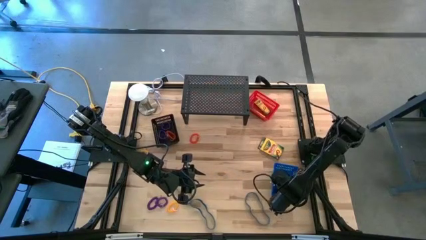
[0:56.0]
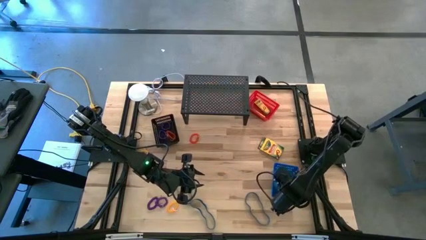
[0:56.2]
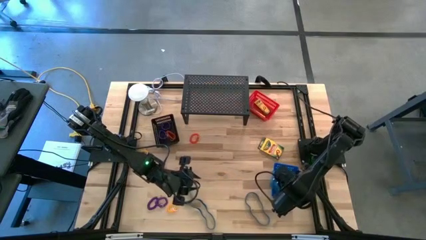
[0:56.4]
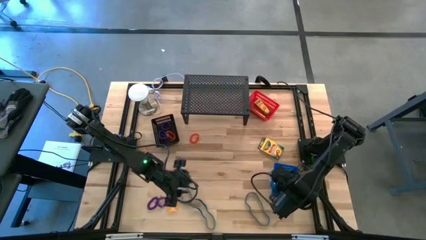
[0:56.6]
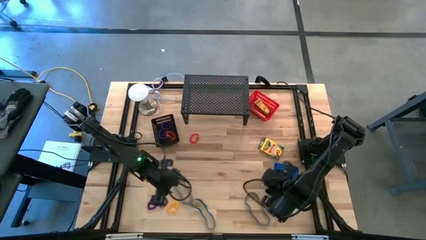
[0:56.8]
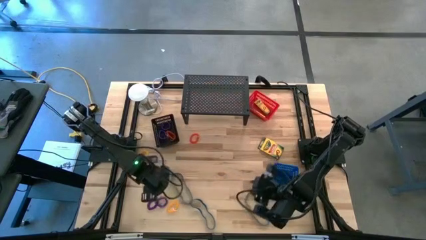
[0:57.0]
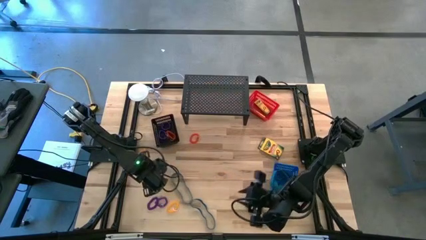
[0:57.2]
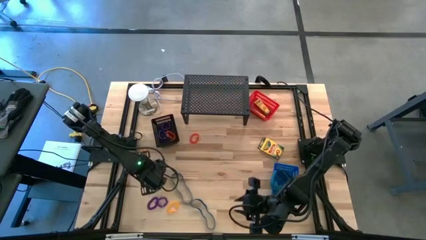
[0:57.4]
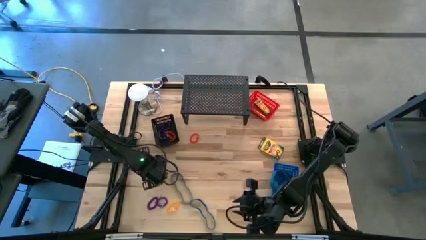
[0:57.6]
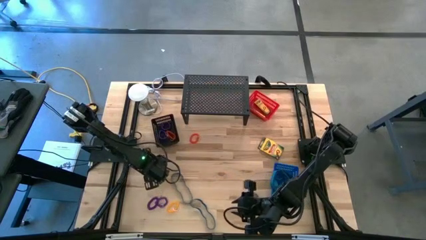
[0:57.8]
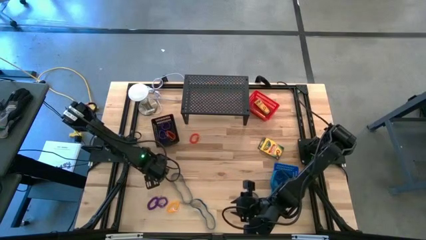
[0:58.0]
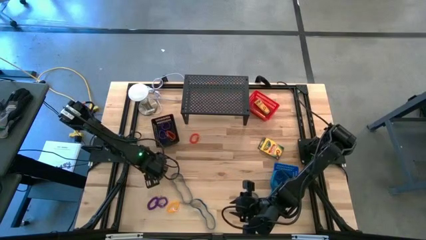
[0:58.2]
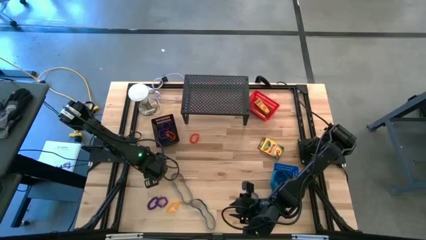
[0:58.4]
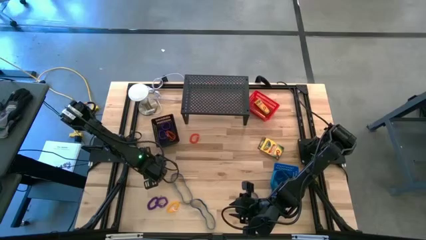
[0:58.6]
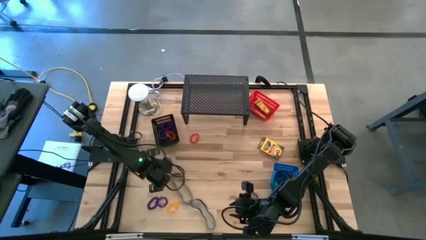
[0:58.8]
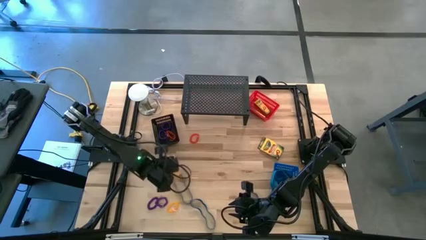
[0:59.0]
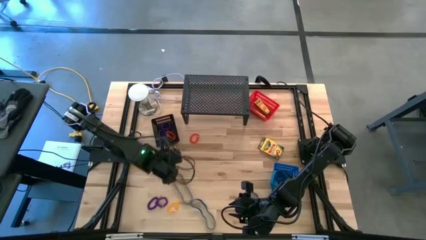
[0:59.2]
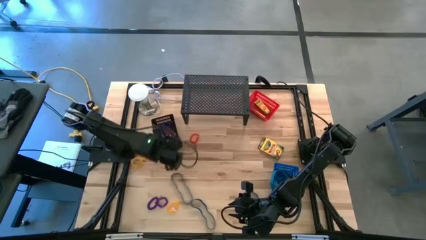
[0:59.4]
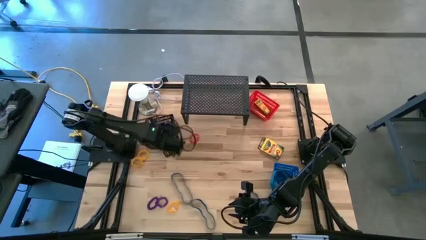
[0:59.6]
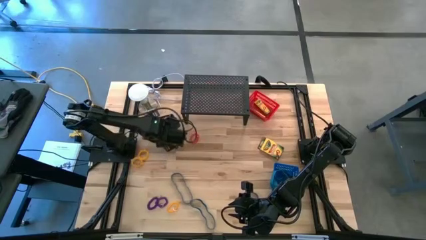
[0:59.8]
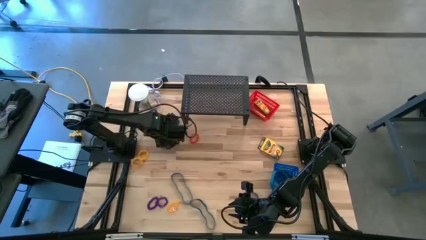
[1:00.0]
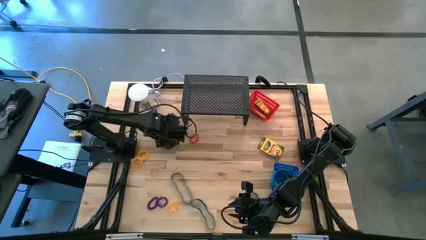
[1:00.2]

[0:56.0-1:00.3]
Task: Pick & Place Office Desk Supplies
Put the yellow spring keychain into the black basket

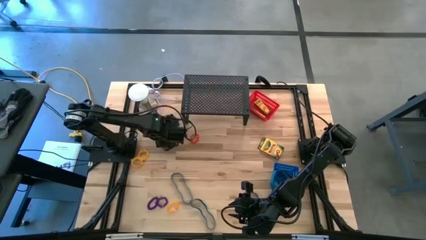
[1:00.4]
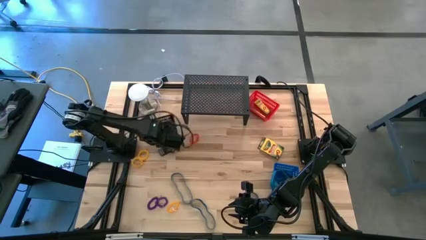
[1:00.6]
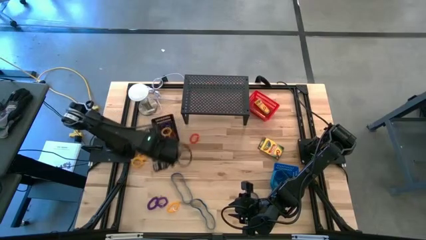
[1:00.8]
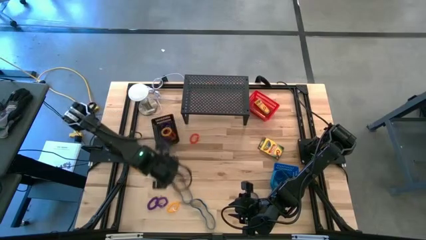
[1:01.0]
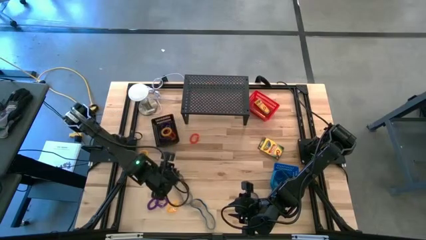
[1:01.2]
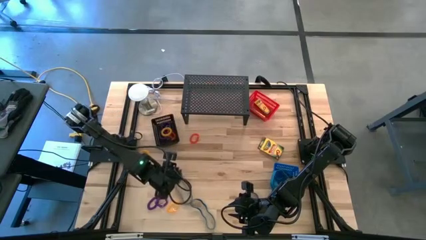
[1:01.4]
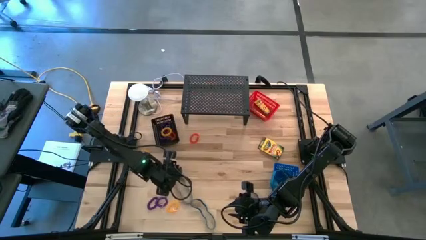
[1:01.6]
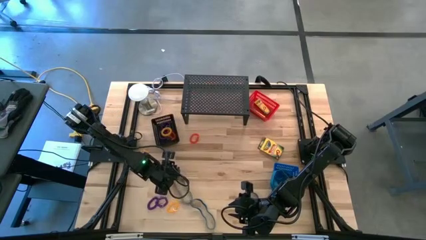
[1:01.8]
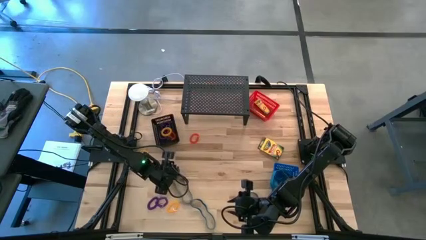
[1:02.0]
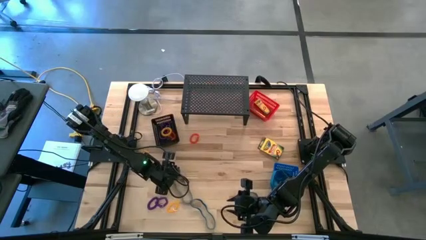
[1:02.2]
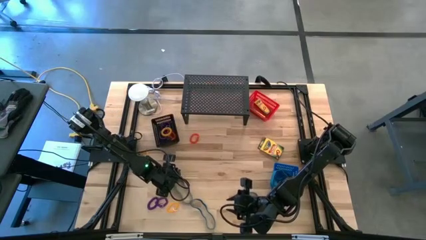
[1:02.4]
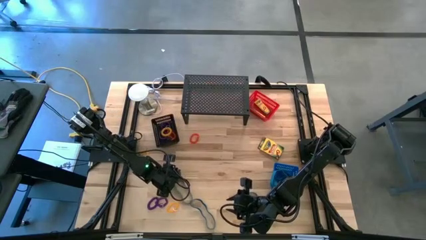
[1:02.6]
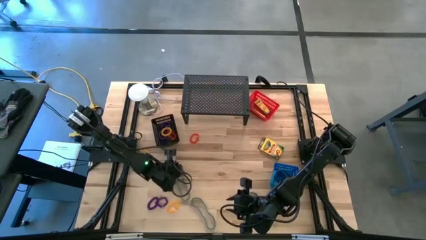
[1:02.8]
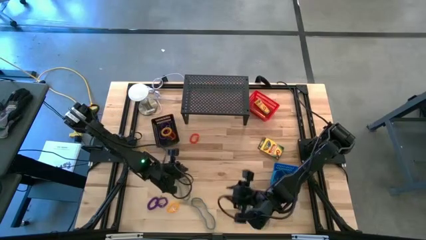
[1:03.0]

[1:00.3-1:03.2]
Put the blue rubber band into the blue basket

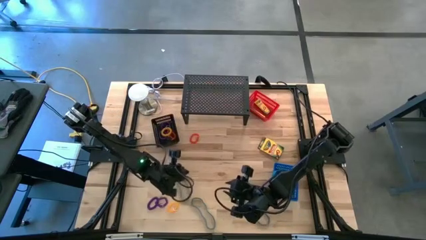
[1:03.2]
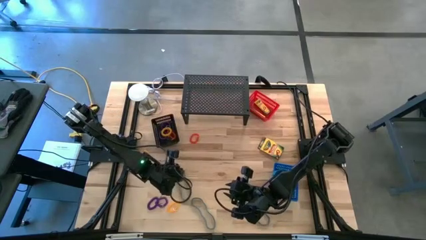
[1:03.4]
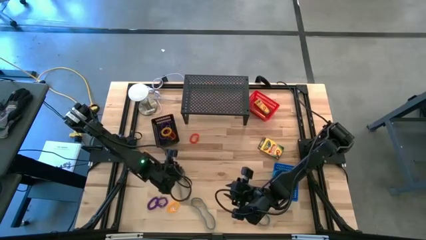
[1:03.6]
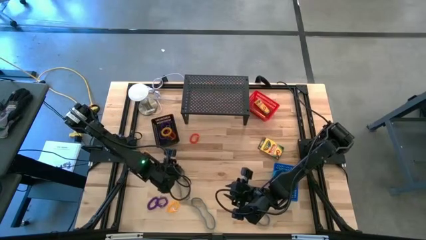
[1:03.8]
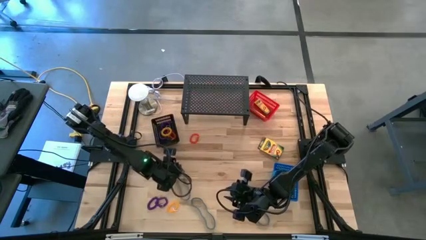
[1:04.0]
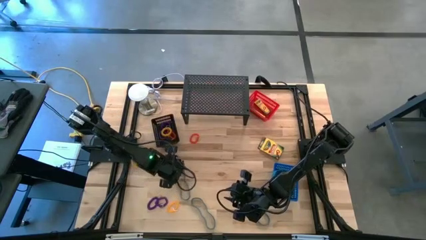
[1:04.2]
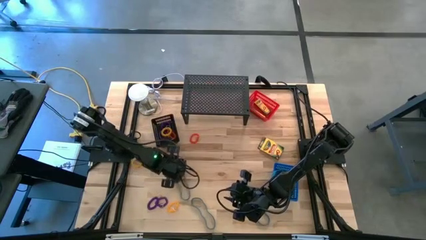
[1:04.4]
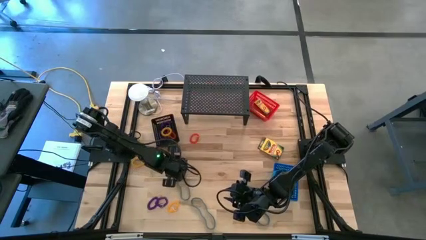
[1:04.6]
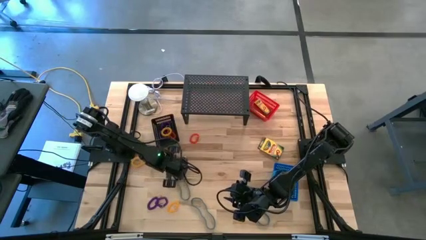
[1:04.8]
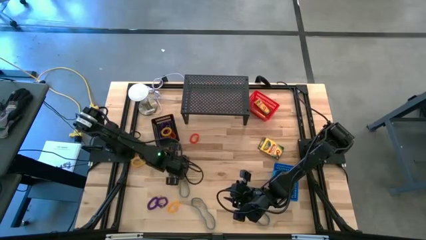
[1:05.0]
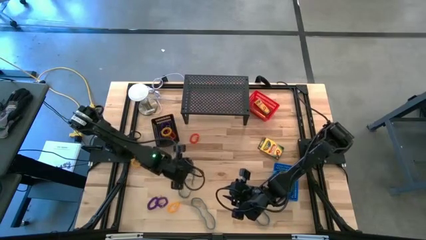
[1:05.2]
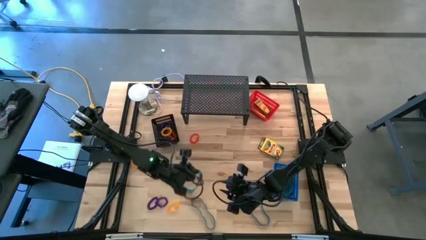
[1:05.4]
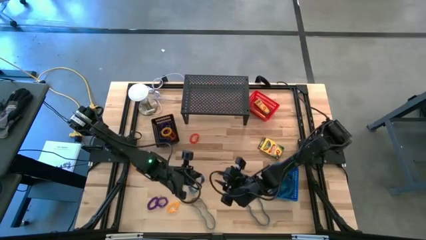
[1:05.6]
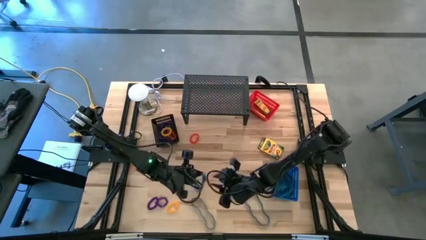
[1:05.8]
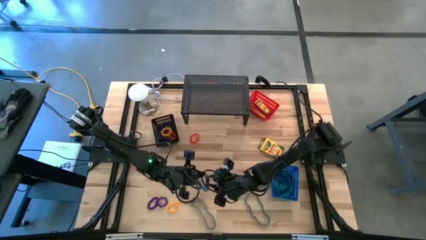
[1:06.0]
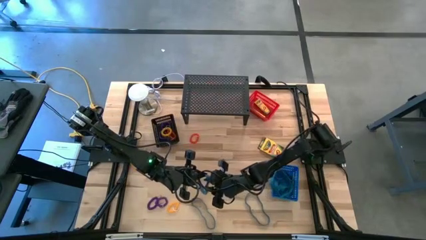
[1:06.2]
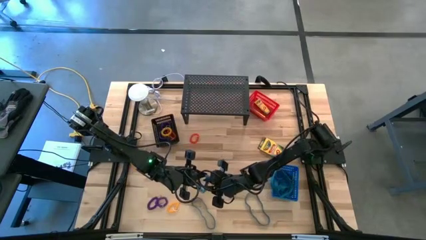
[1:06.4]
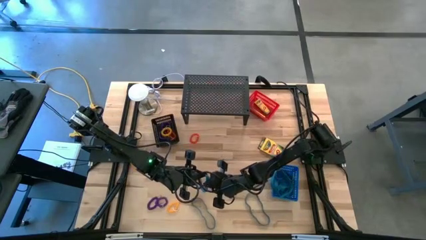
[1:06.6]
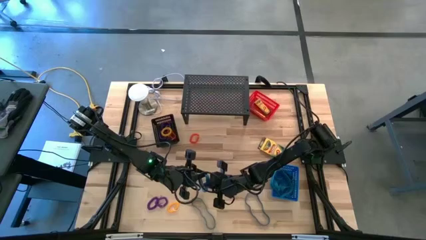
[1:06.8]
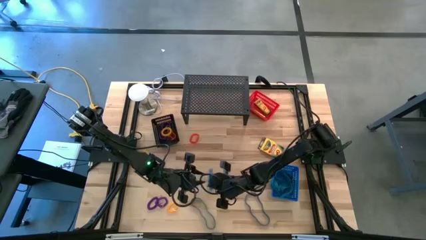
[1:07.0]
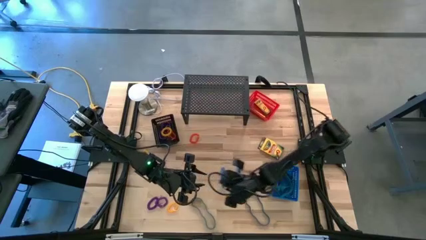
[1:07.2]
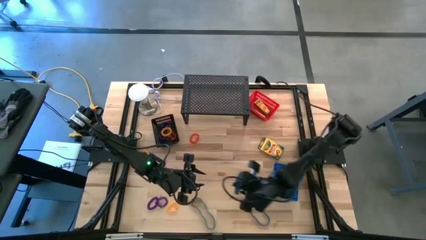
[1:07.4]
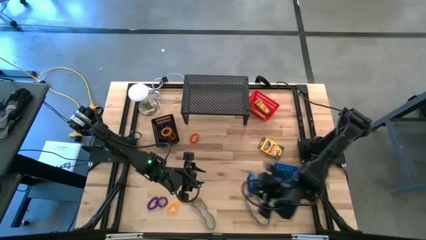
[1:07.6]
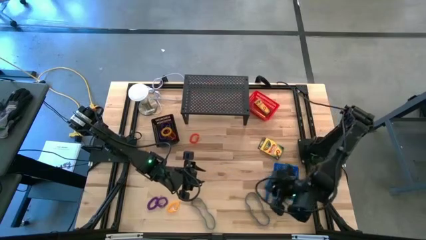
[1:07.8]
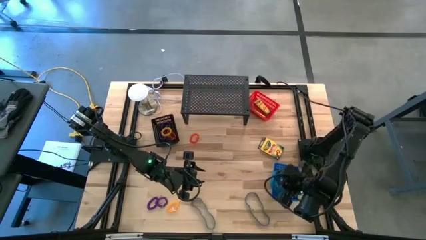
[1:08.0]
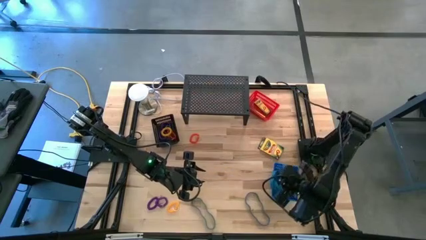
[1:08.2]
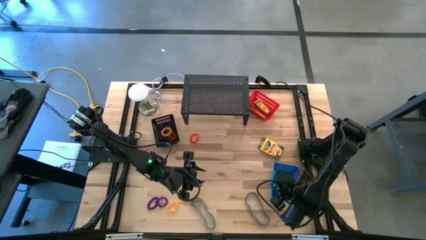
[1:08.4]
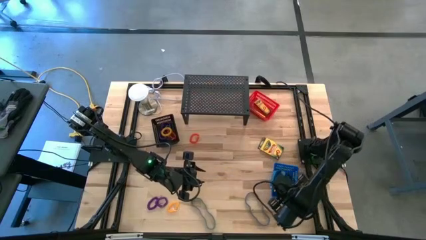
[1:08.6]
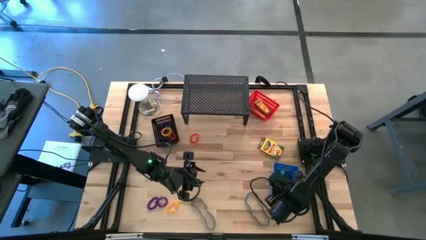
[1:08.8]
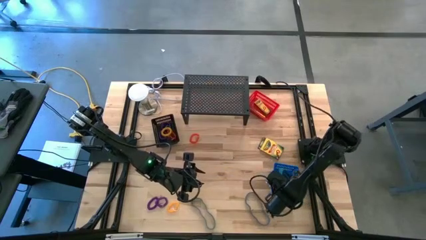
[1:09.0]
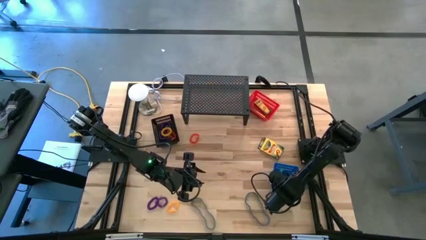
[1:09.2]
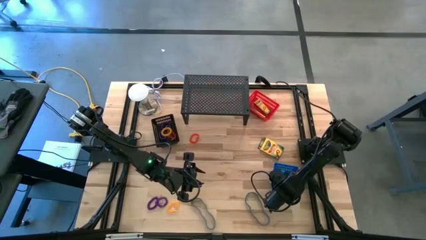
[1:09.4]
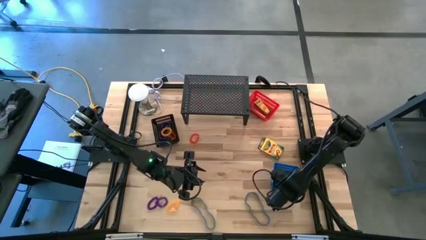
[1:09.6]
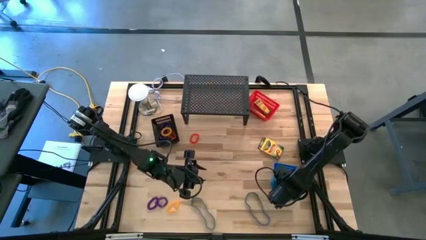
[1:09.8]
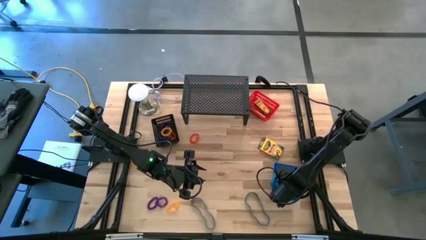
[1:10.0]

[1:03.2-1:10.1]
Put the blue rubber band into the blue basket

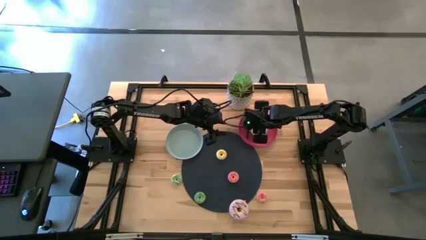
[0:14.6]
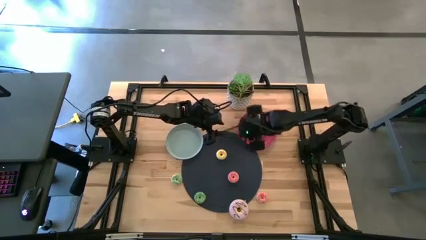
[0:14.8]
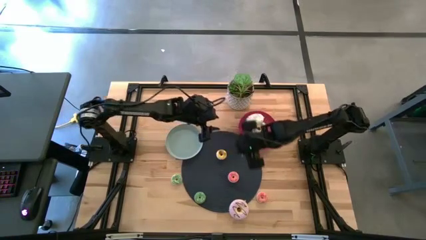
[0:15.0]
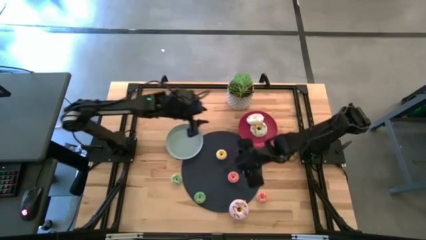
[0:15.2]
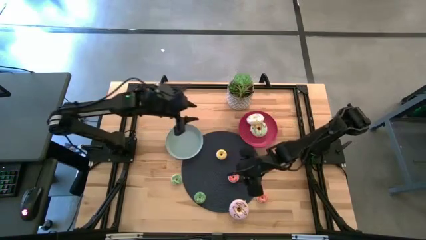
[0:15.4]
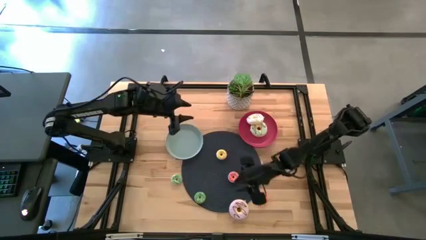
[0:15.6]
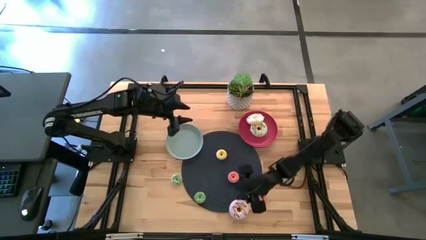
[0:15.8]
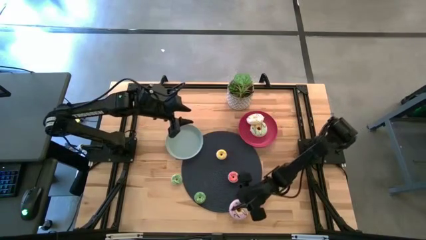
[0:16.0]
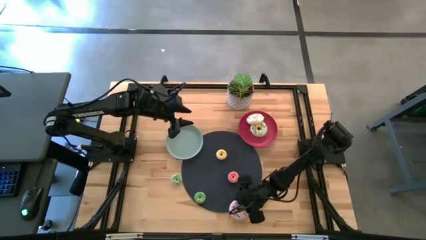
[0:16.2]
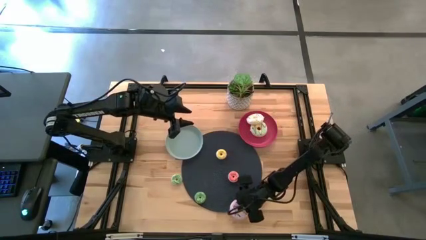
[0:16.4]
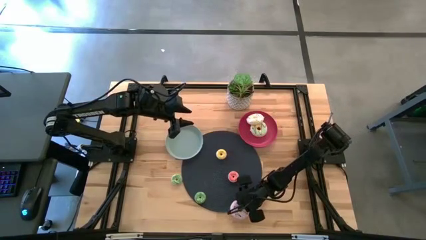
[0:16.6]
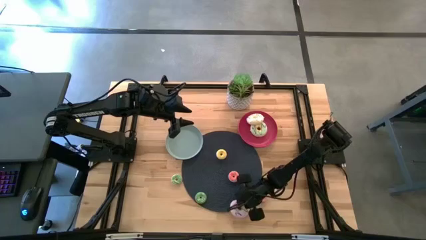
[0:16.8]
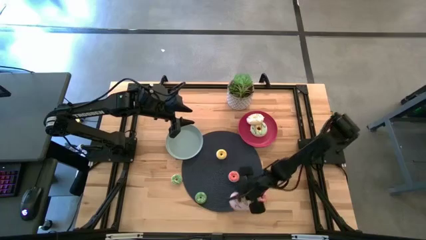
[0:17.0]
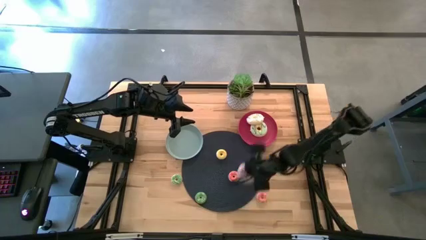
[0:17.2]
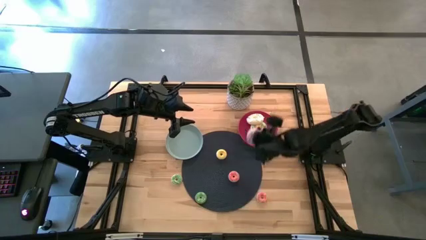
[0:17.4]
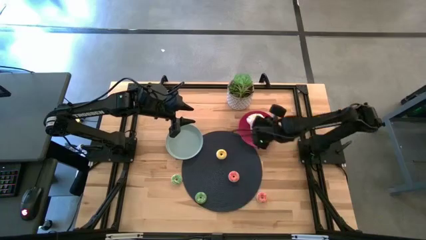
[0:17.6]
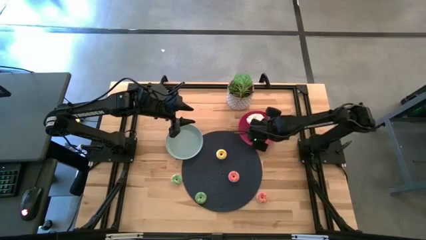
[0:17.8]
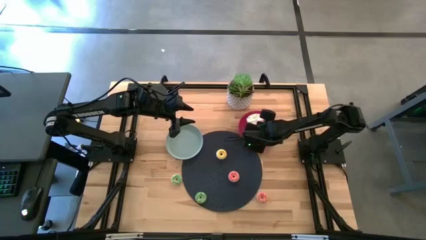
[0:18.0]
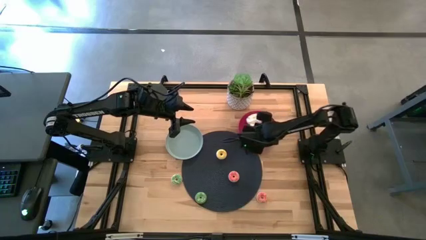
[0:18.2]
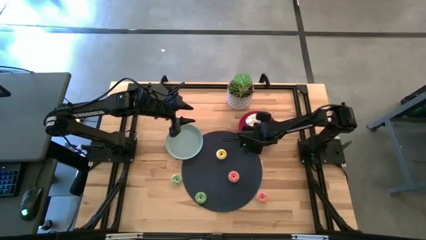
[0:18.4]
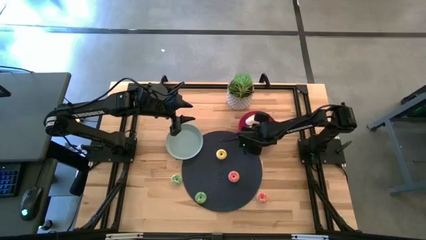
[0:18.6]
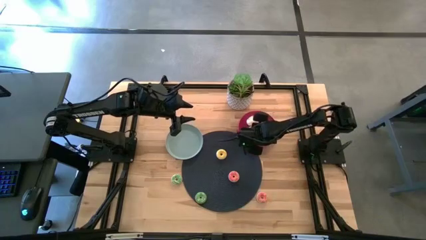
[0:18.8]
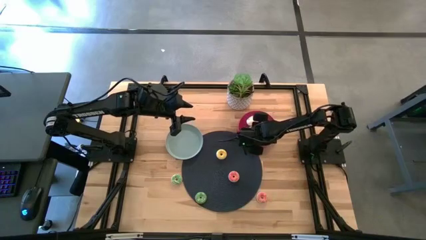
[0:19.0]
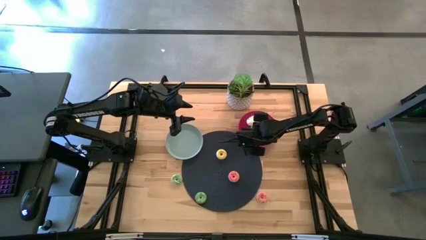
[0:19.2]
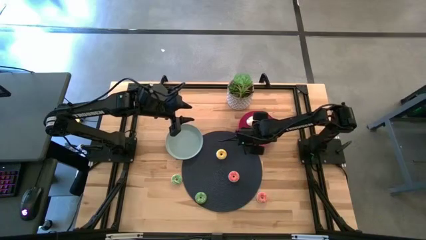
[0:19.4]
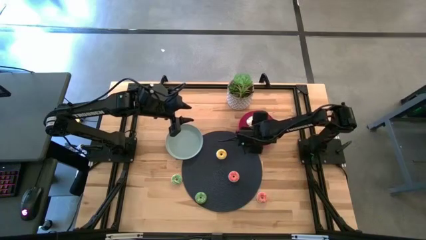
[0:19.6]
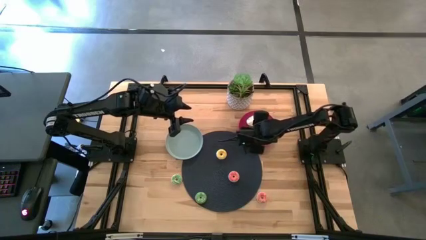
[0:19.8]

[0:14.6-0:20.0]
Task: Pick & Place donuts
Put the big purple doughnut on the red plate
